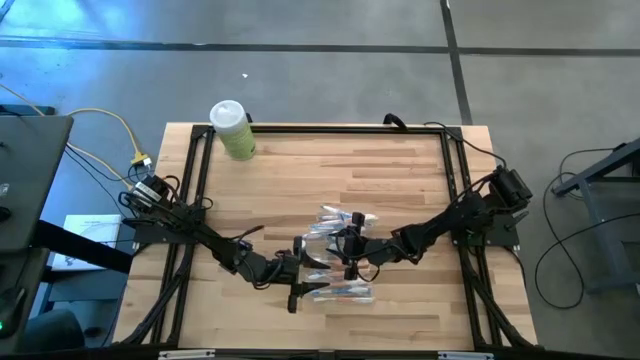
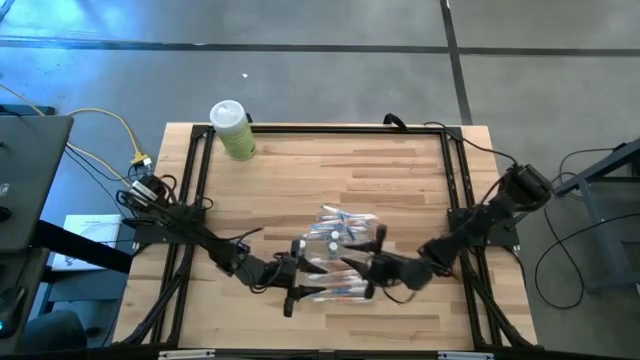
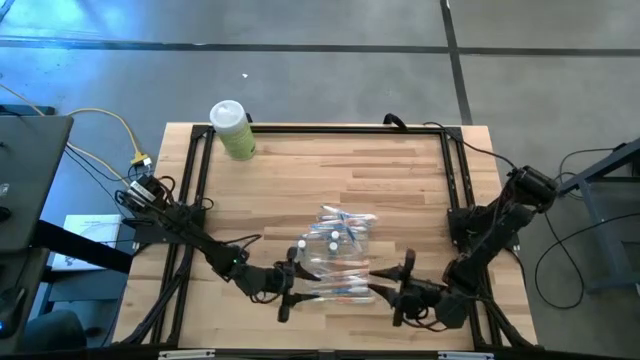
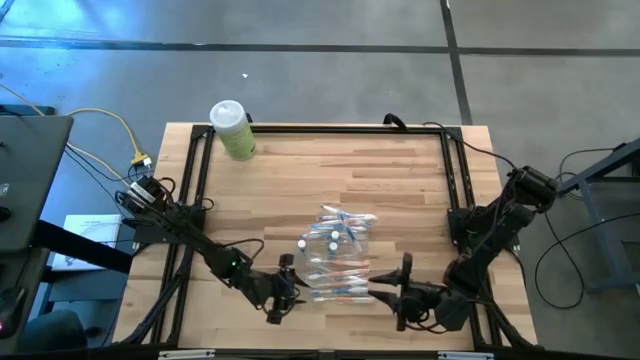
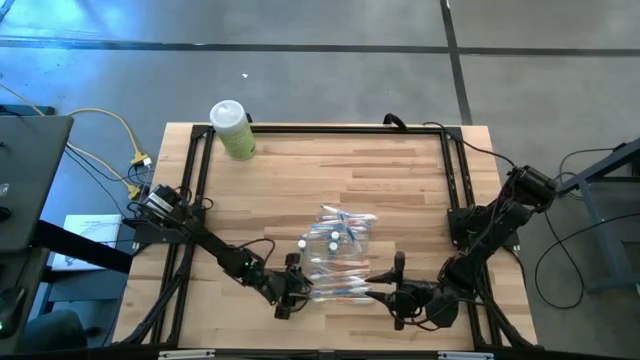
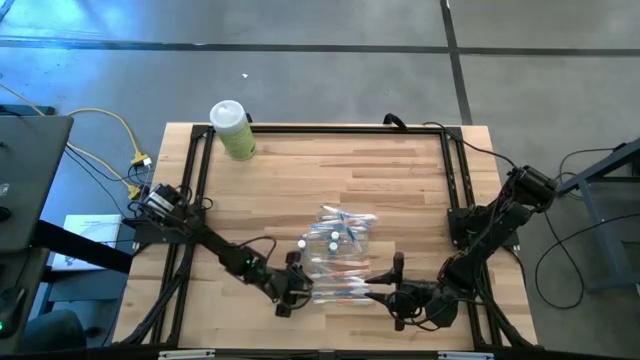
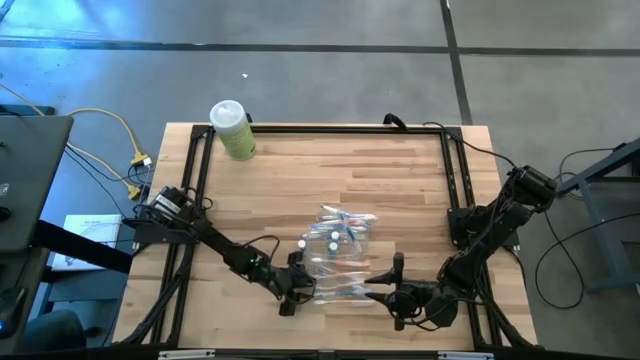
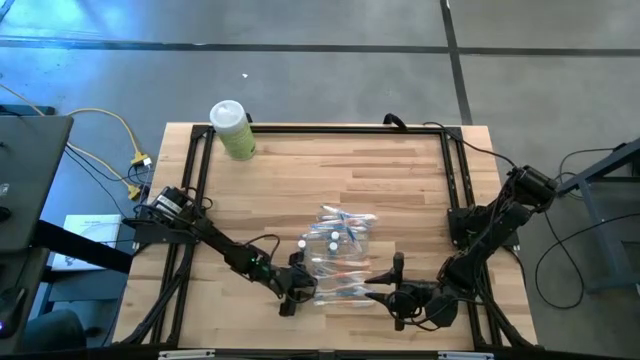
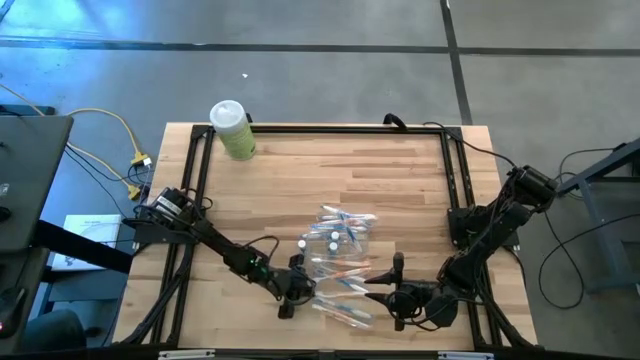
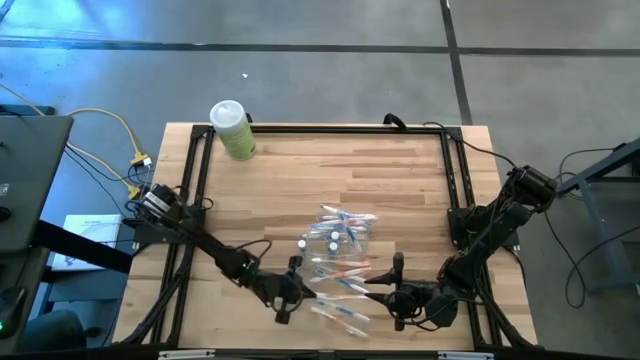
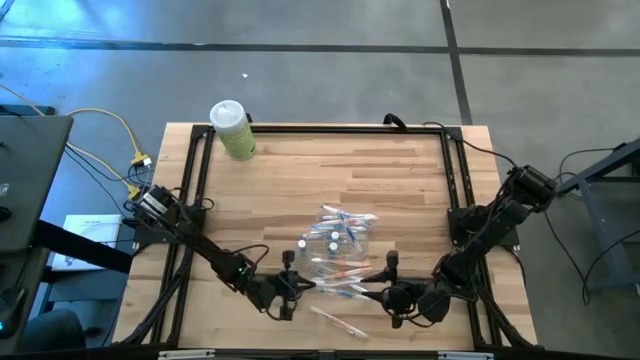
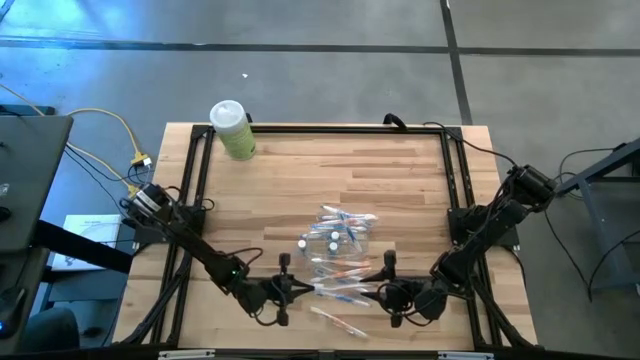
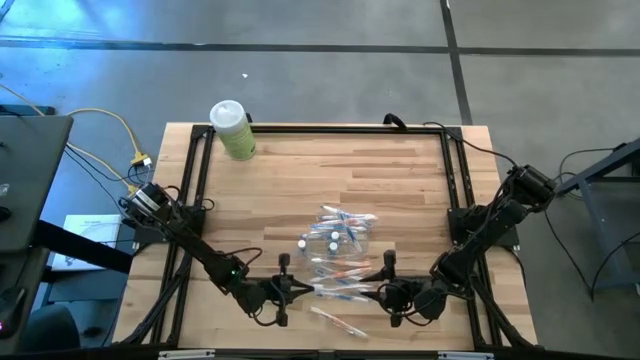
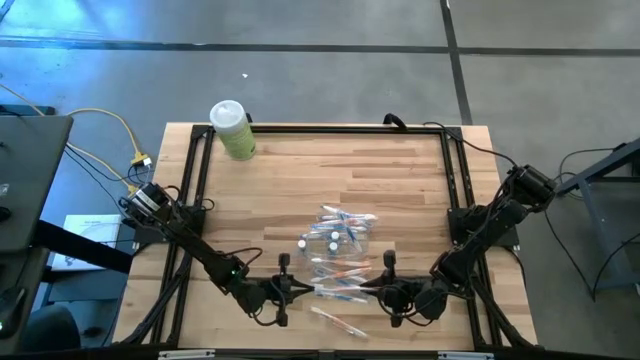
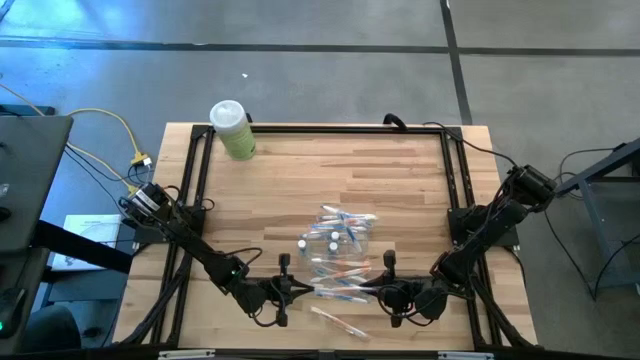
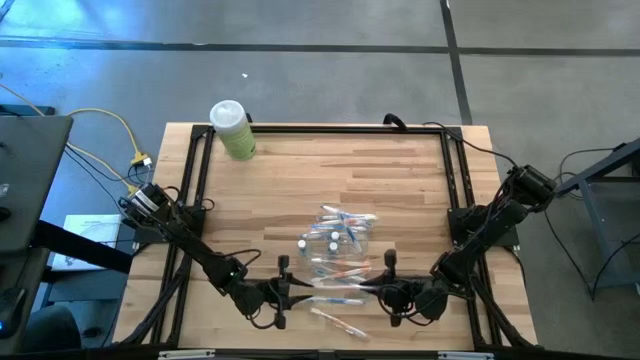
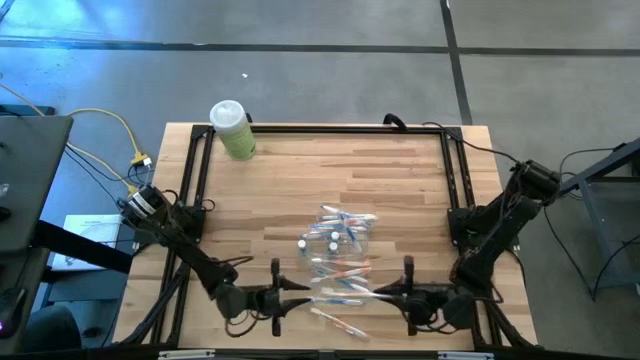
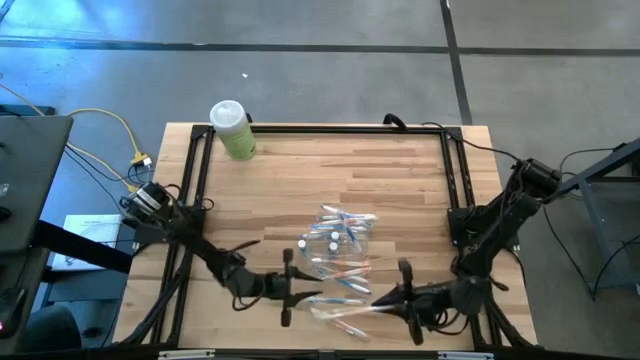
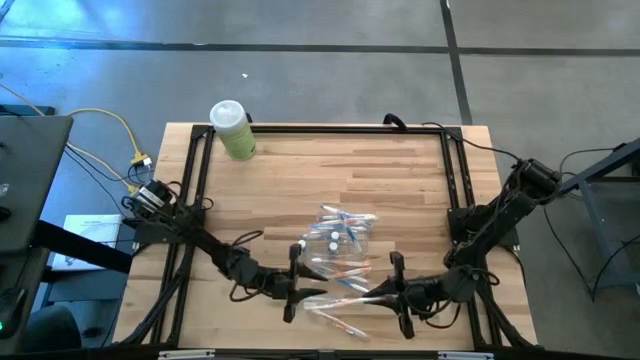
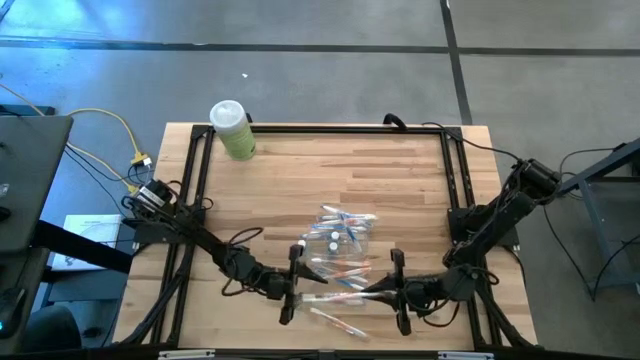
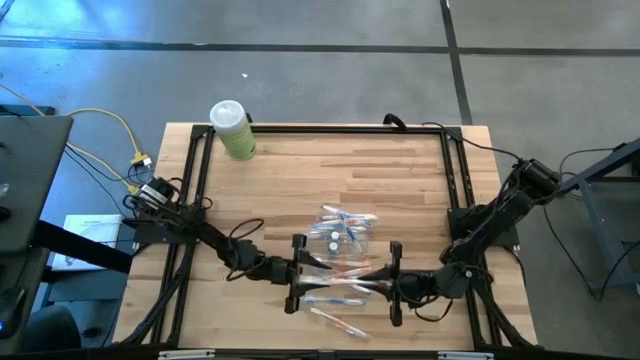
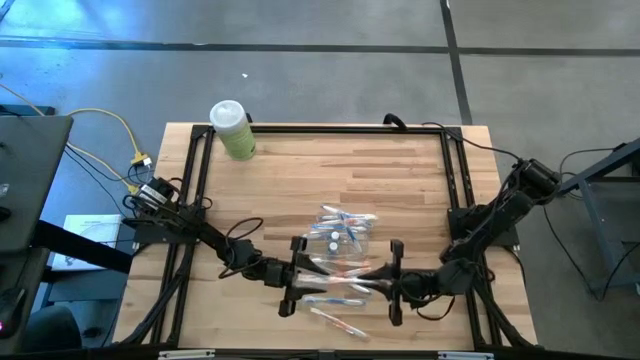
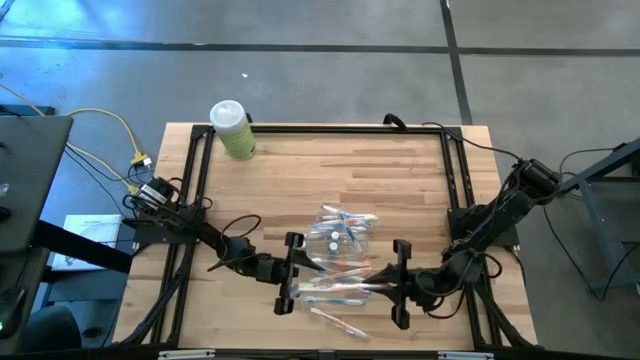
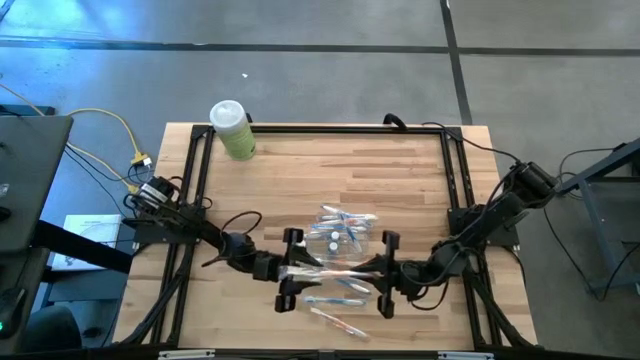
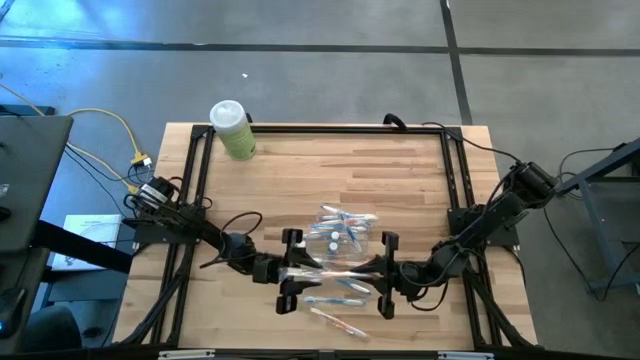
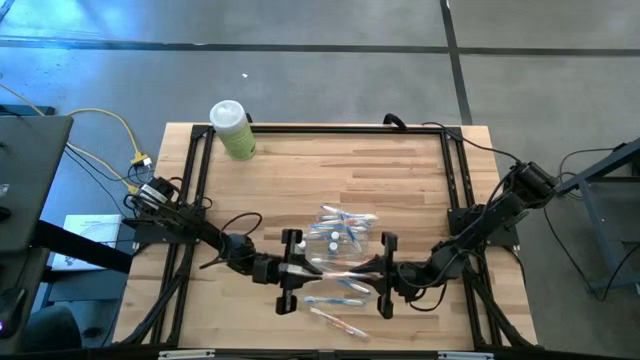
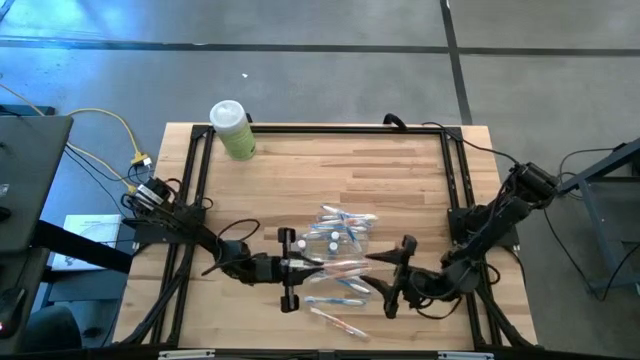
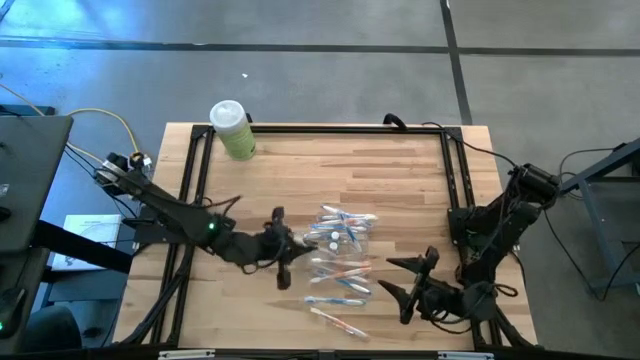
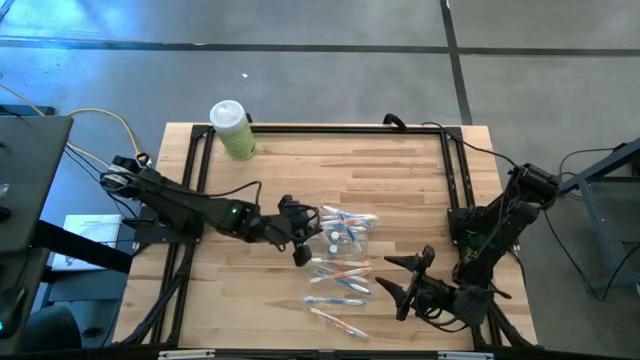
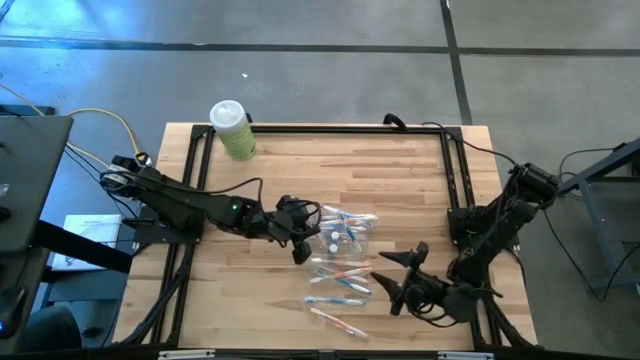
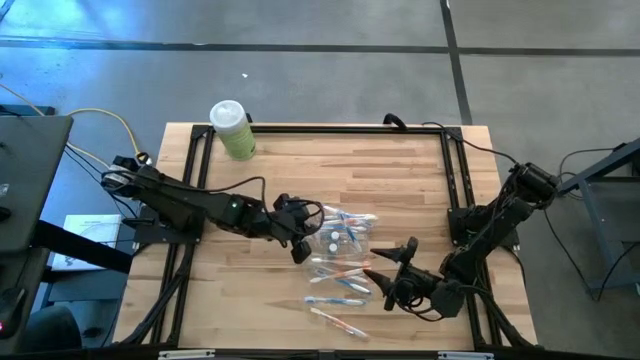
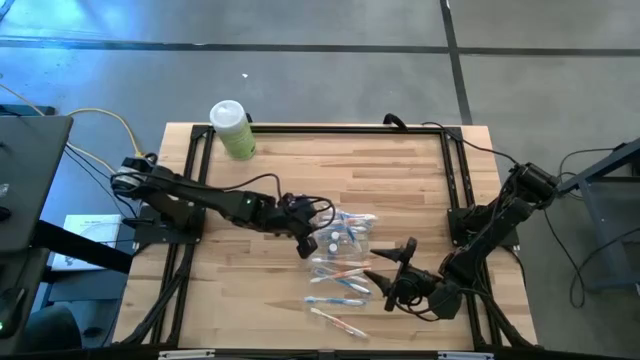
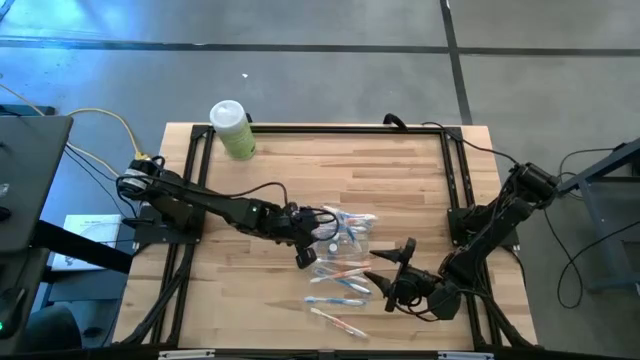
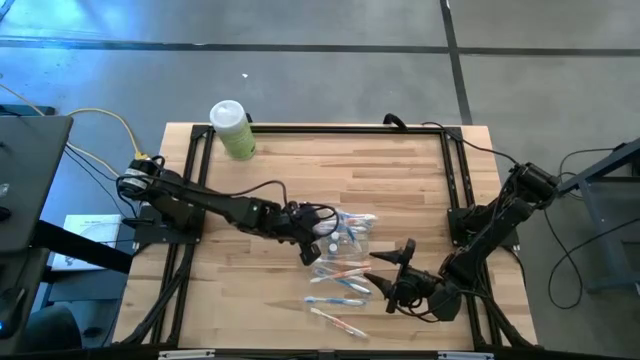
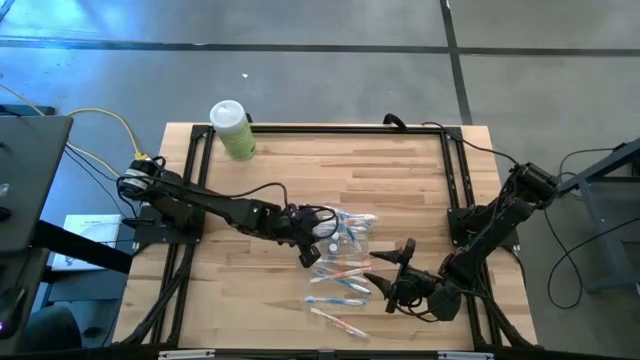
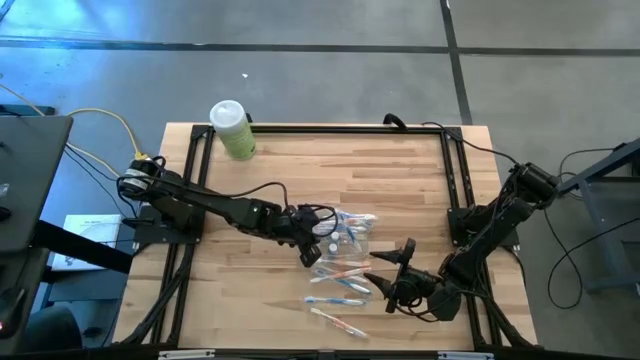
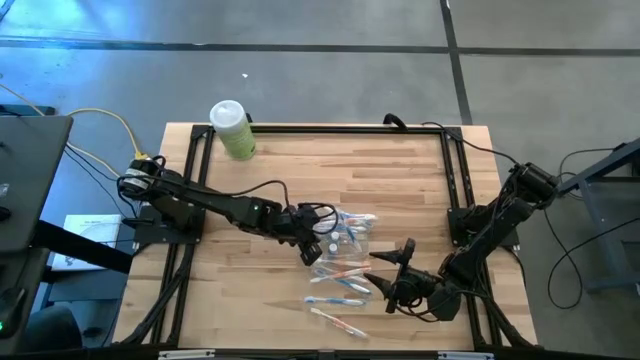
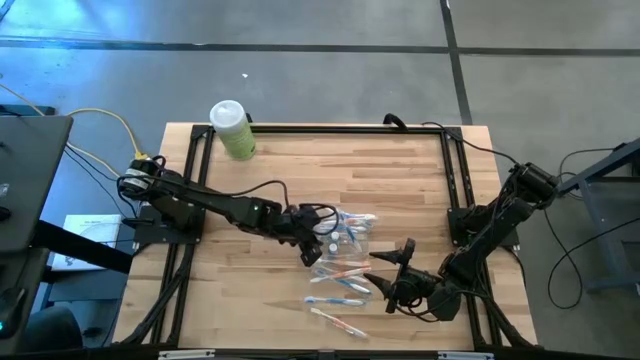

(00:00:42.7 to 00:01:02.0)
Task: Pick & Place toothbrushing station
Put the orange toothbrush into the transparent organizer

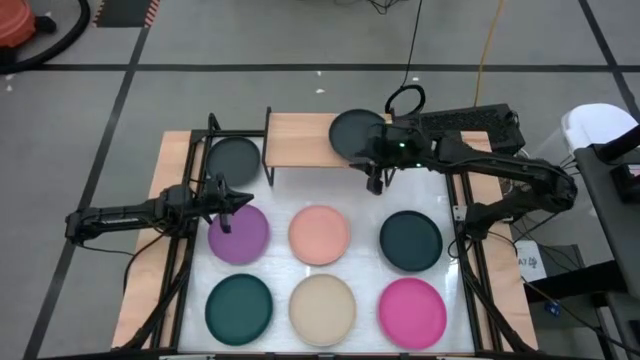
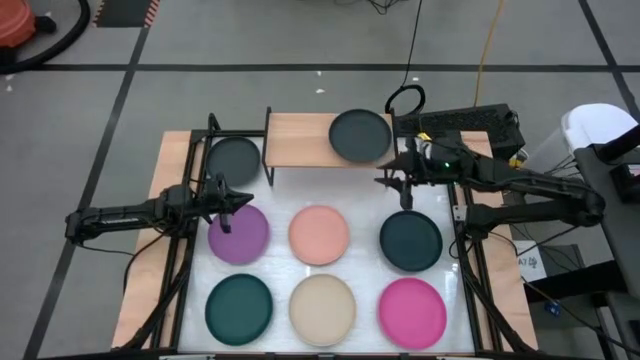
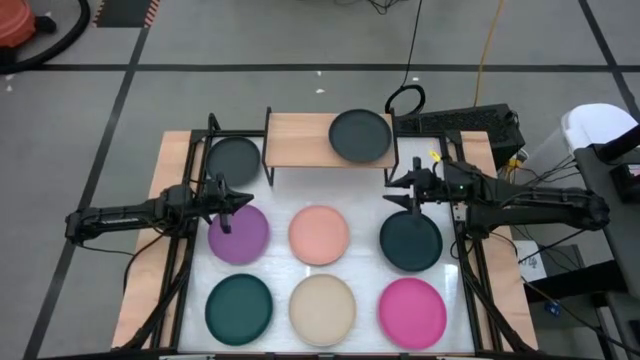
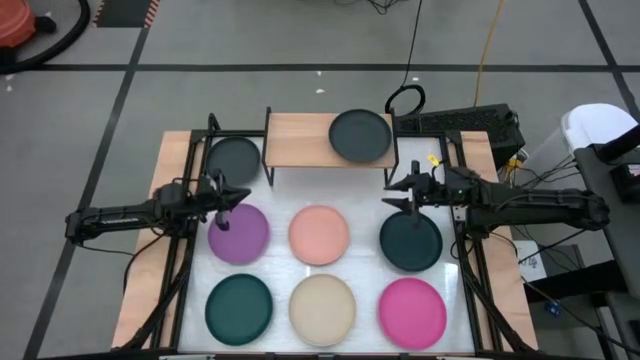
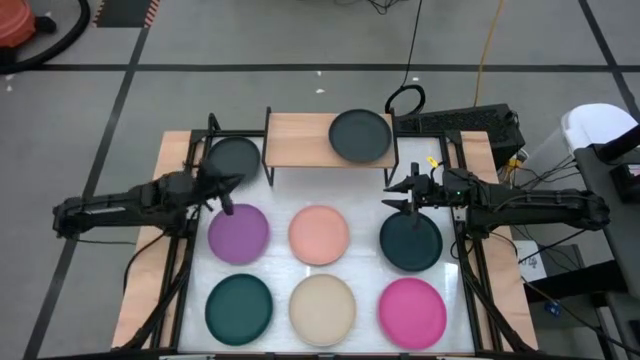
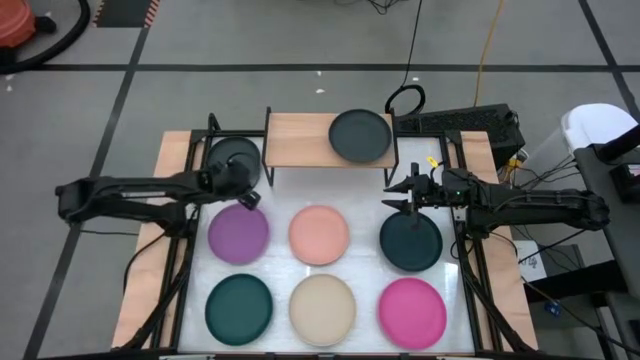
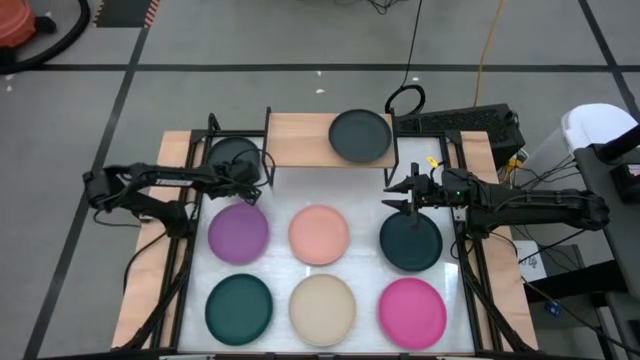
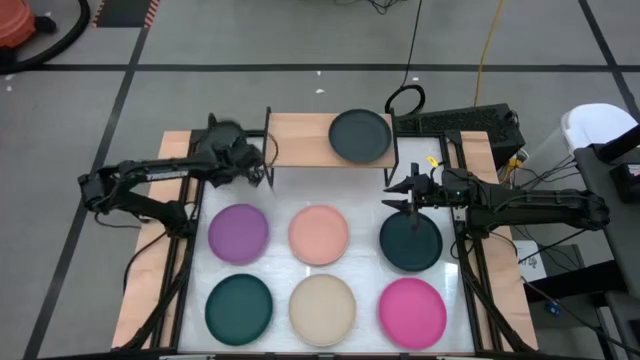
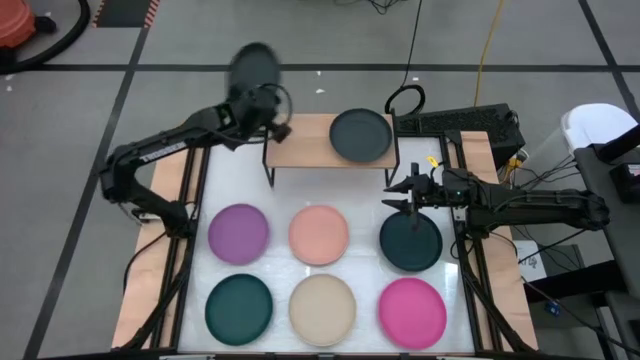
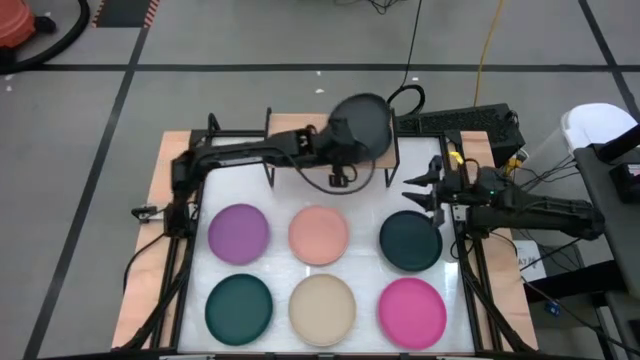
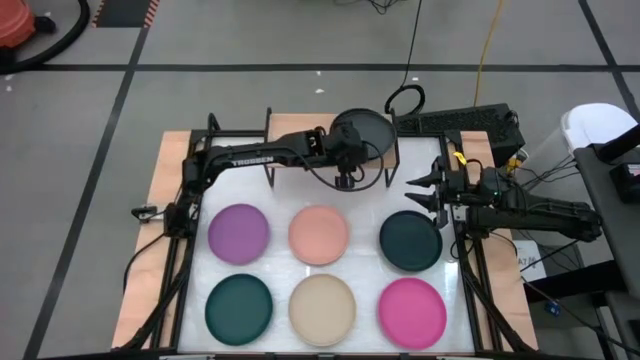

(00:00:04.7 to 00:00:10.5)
Task: Place and stack plates onto a shelf
Stack the black plate on top of the black plate on the shelf
